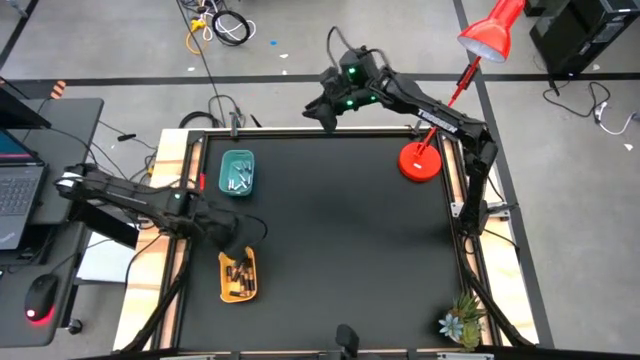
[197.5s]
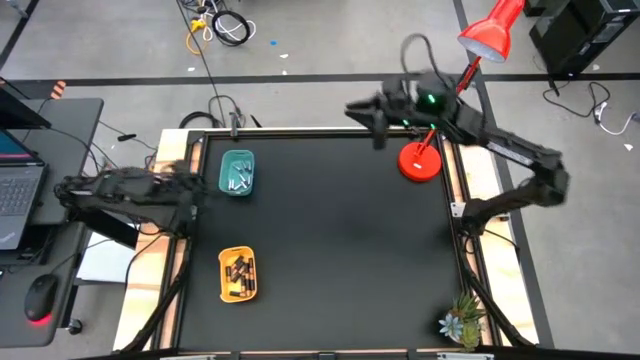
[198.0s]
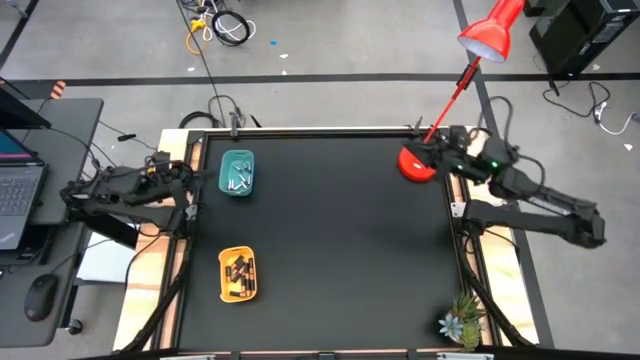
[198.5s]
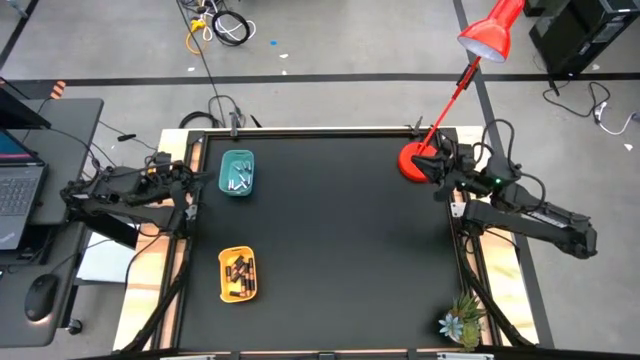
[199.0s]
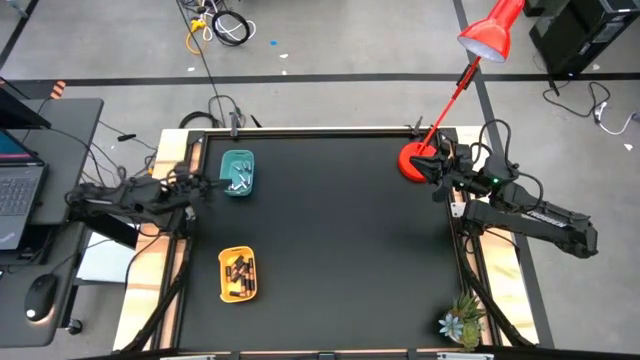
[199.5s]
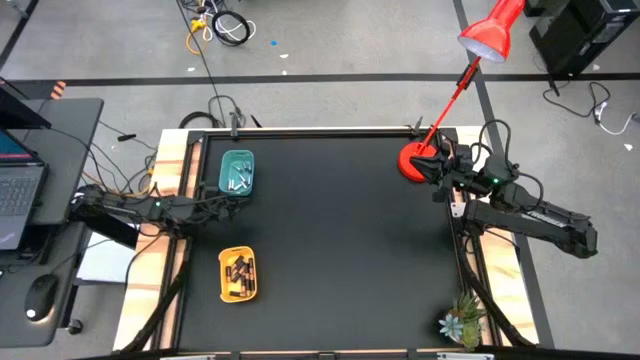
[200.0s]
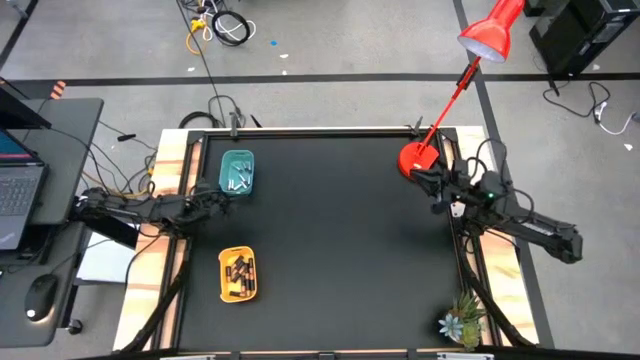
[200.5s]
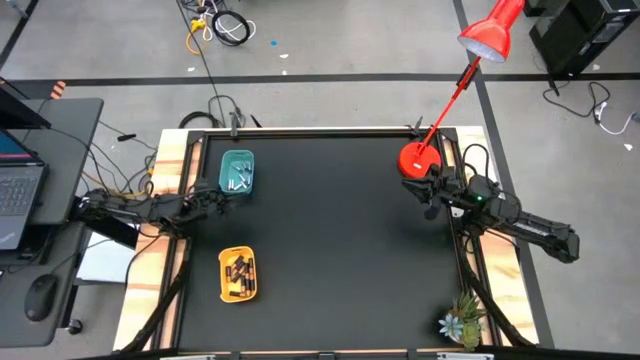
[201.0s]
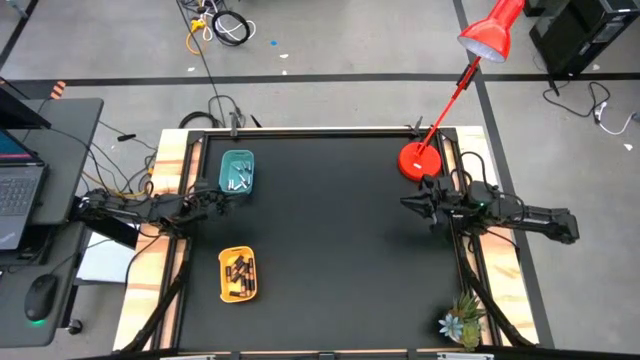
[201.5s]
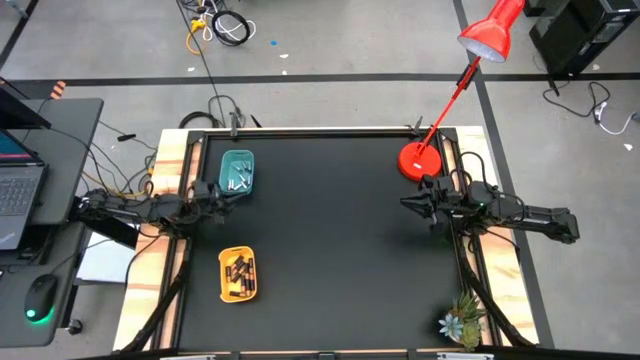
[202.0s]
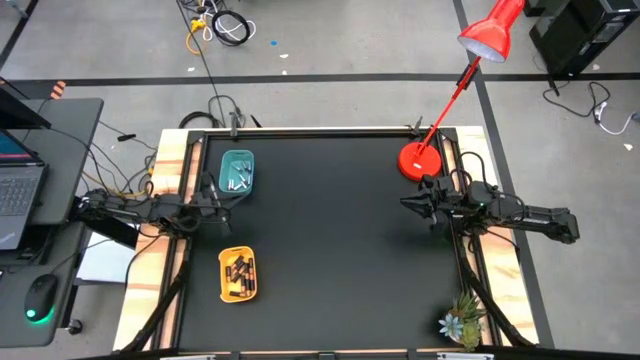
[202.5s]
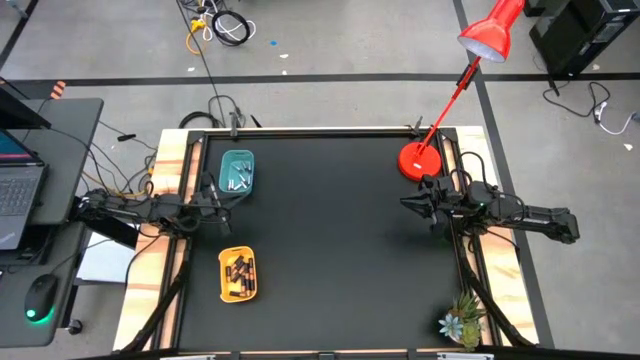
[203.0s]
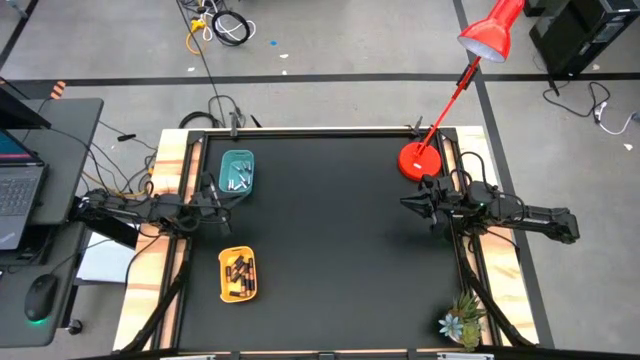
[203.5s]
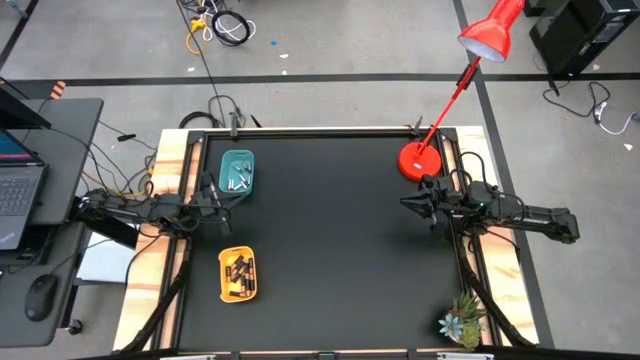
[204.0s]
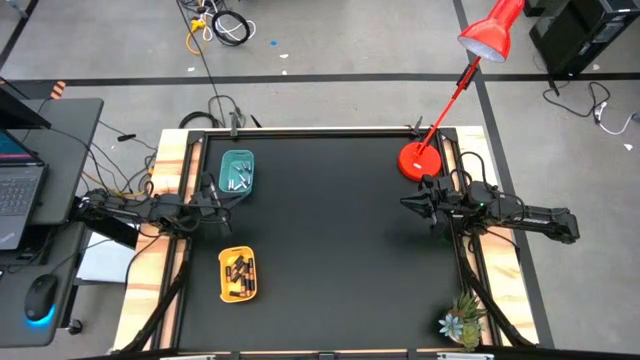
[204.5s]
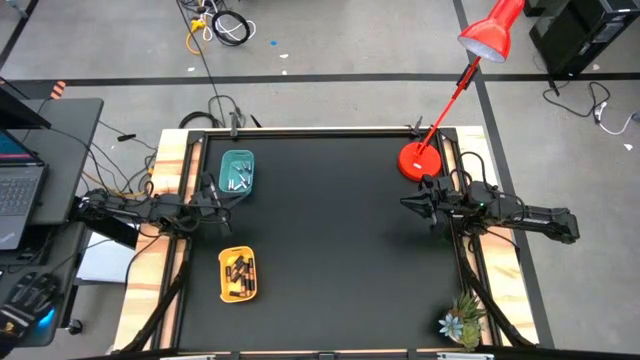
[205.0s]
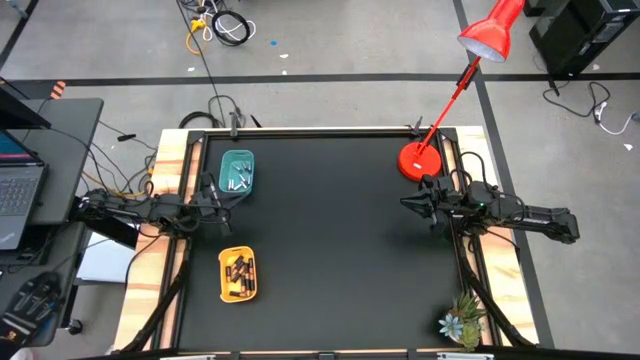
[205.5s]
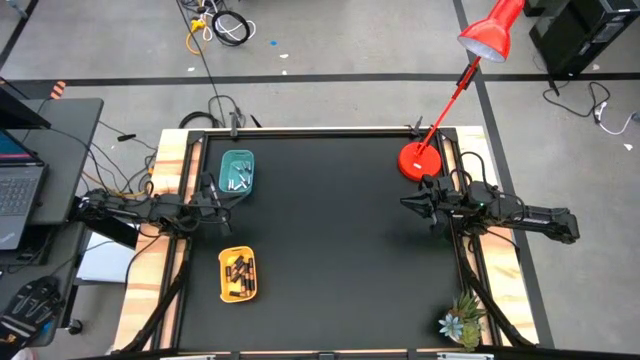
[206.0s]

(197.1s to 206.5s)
Task: Sort batteries
Return to Home Position

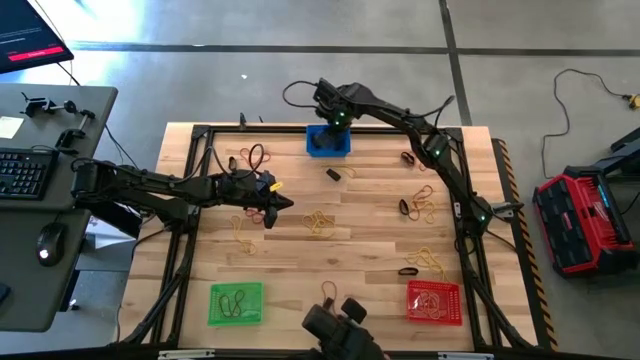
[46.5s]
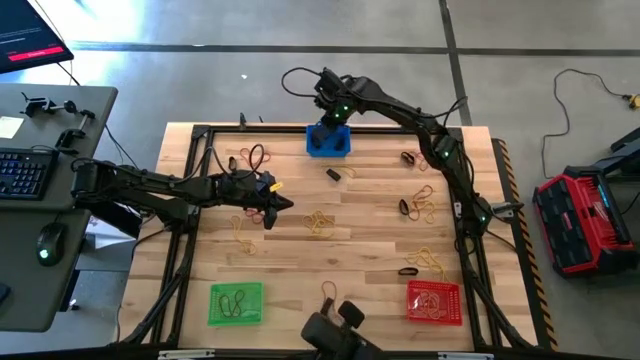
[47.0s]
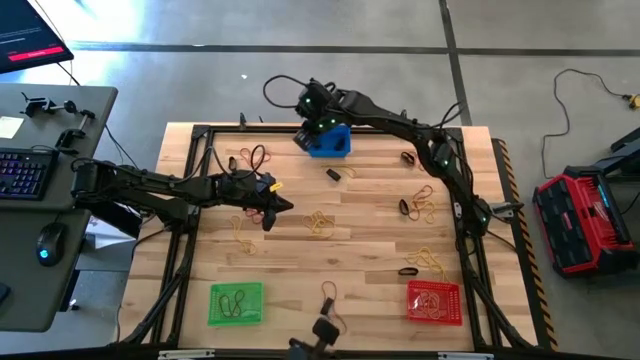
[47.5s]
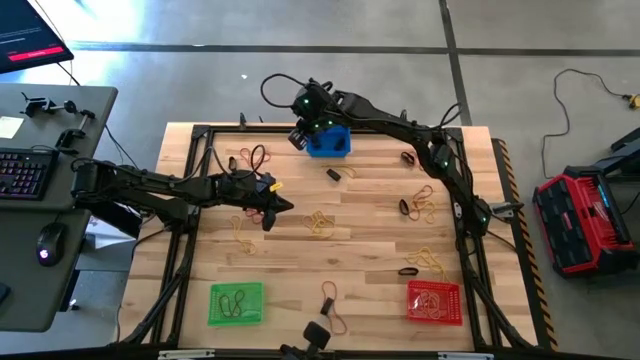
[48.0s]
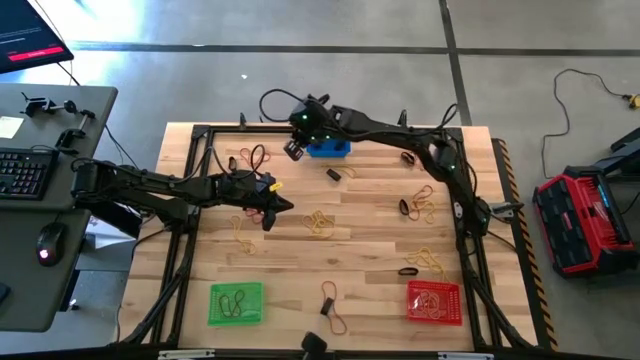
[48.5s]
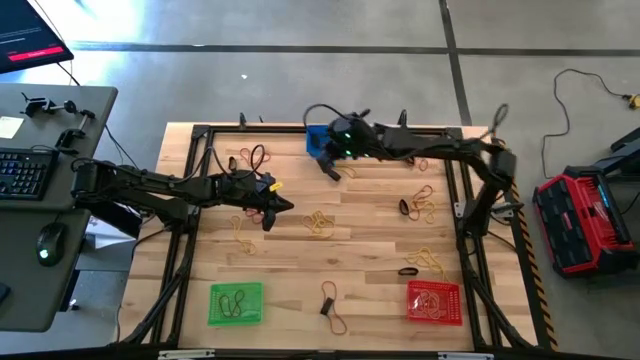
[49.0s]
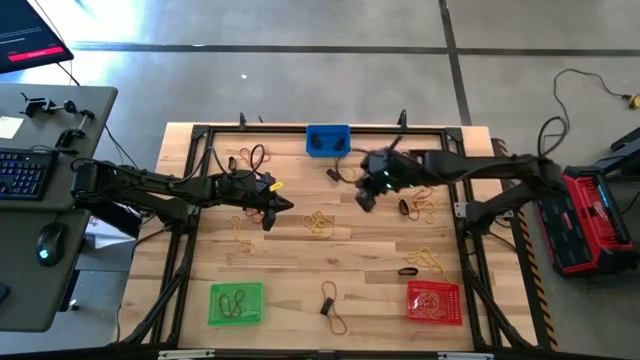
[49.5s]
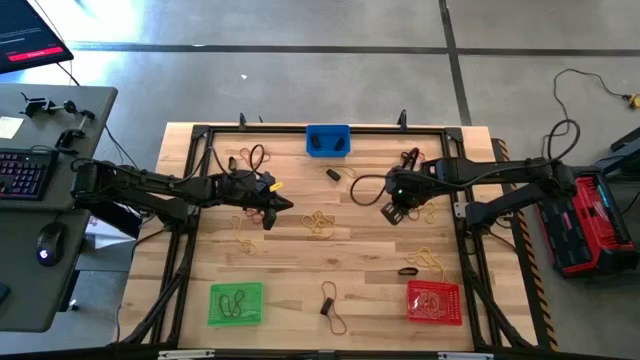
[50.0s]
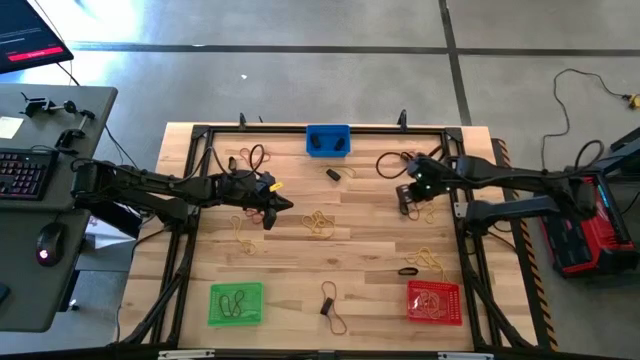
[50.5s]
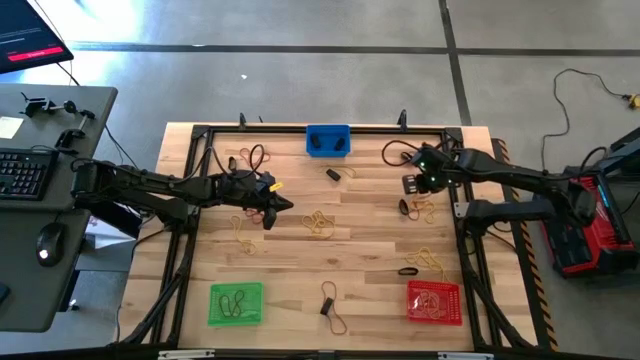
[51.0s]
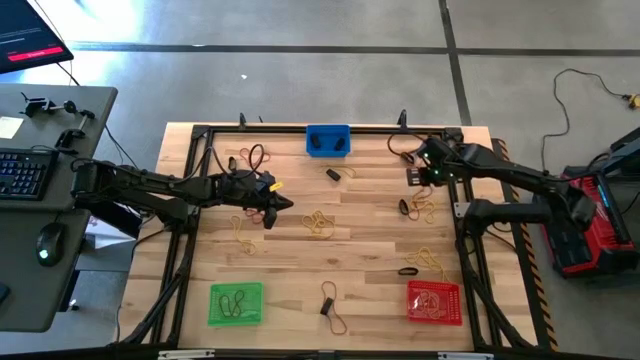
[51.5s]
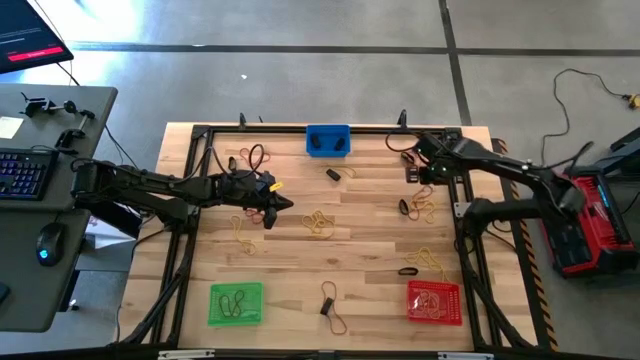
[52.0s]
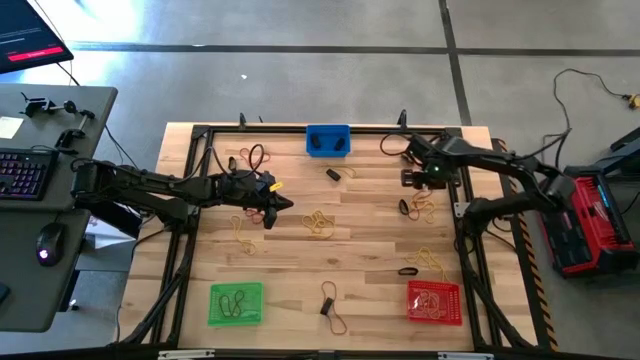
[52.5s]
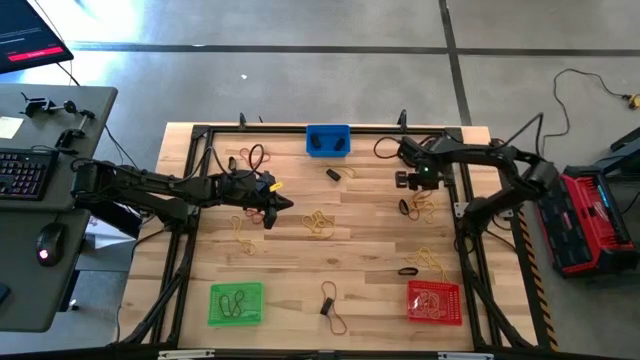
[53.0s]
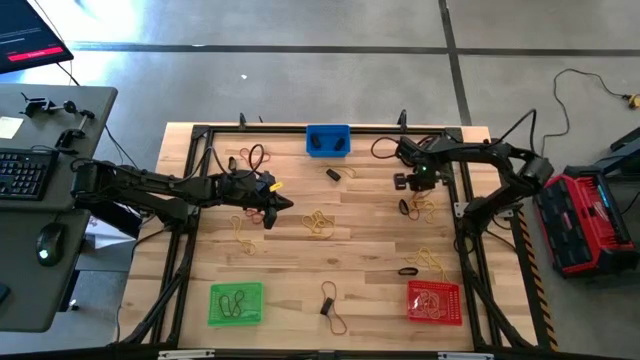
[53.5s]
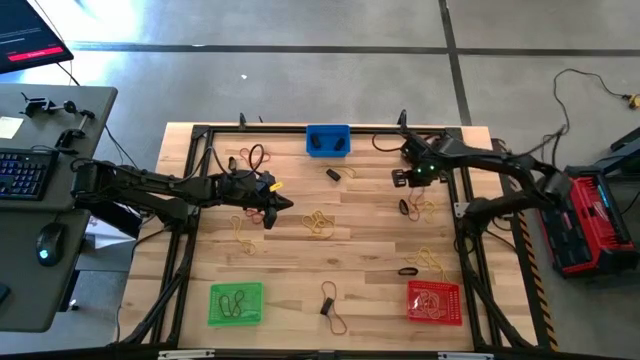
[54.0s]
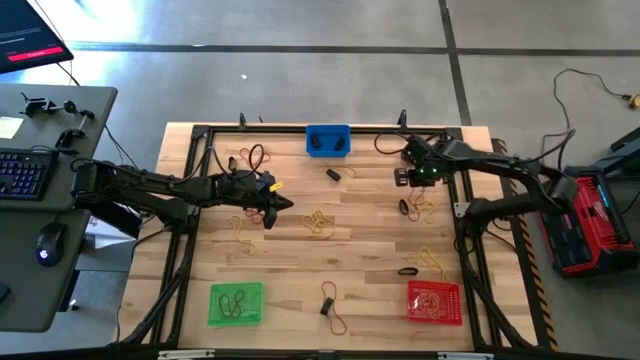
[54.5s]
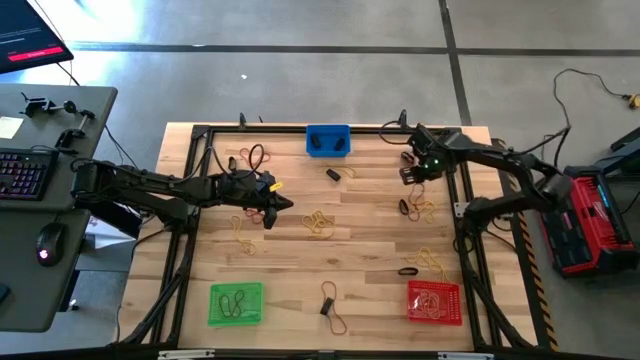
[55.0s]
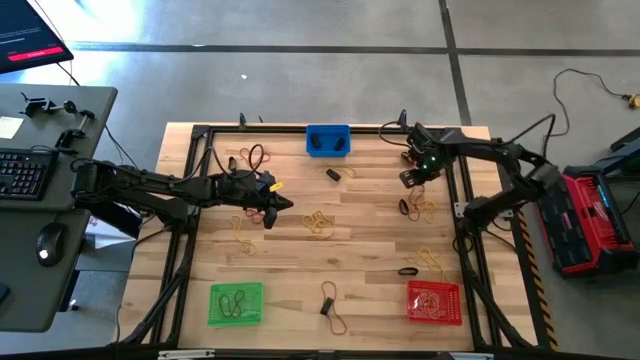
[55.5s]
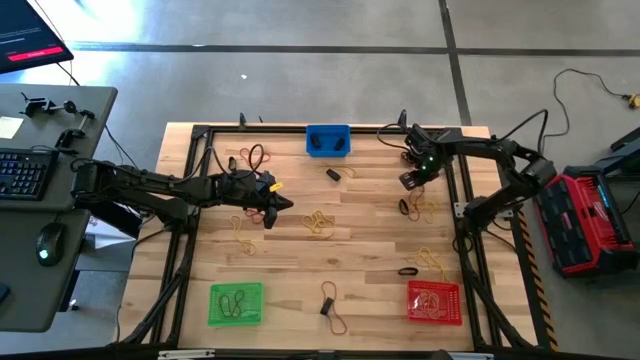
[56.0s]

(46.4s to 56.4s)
Task: Sort rubber bands into baskets
Put the red rubber band into the green basket
